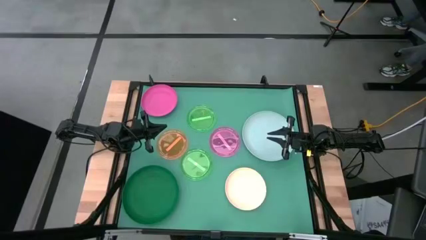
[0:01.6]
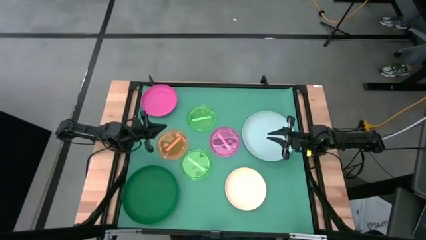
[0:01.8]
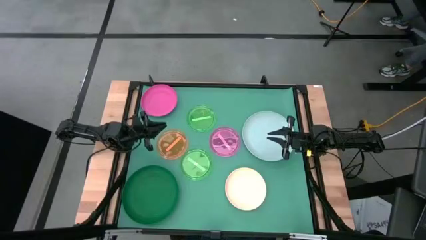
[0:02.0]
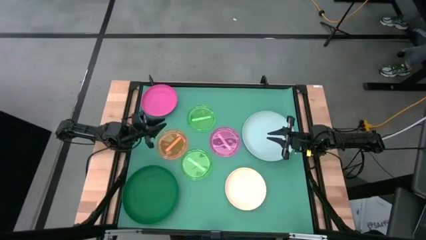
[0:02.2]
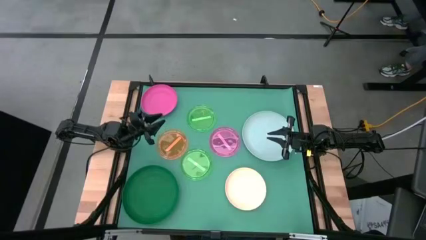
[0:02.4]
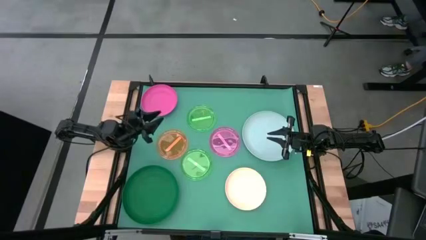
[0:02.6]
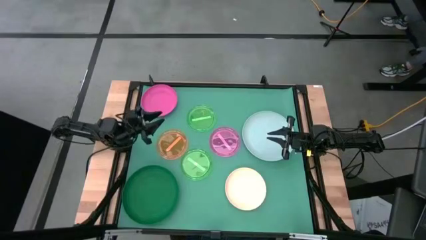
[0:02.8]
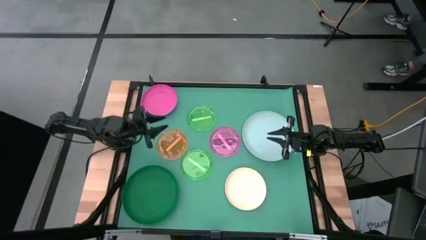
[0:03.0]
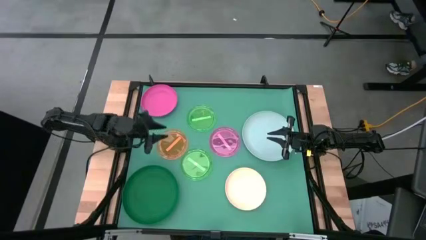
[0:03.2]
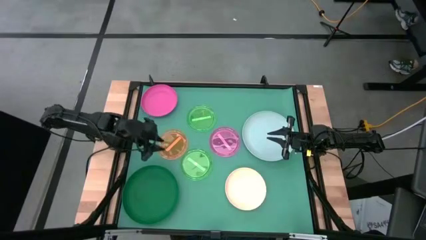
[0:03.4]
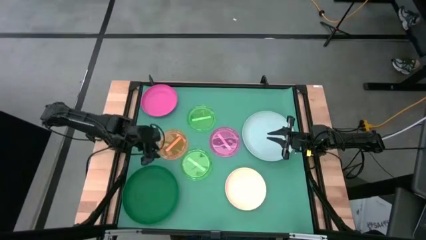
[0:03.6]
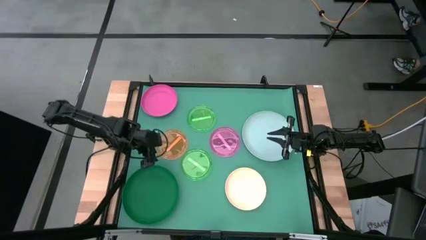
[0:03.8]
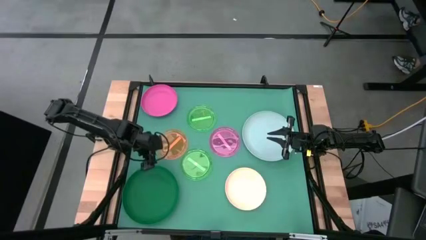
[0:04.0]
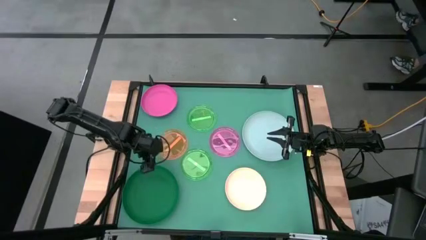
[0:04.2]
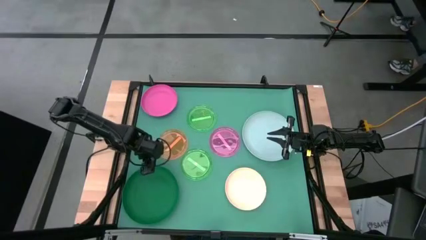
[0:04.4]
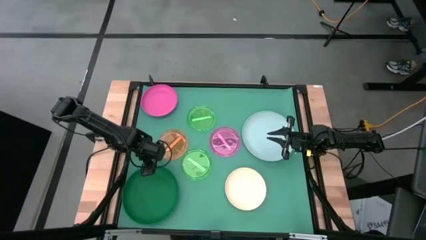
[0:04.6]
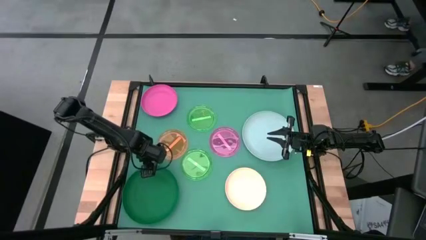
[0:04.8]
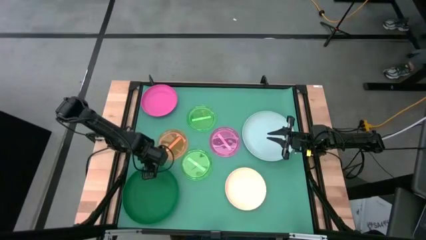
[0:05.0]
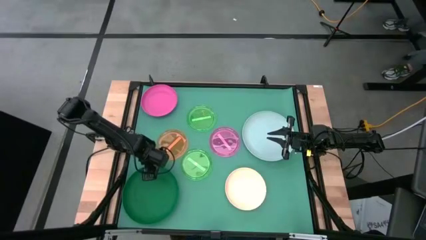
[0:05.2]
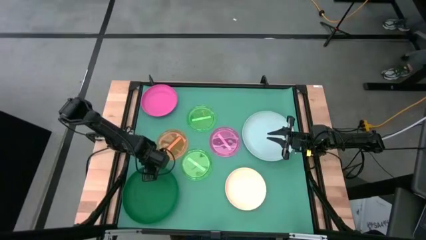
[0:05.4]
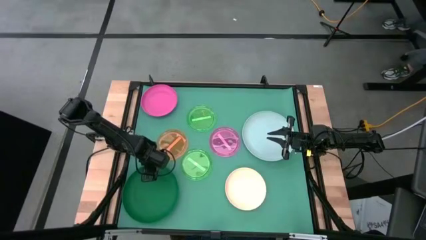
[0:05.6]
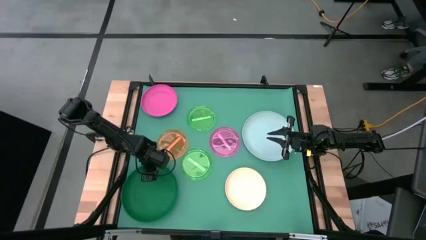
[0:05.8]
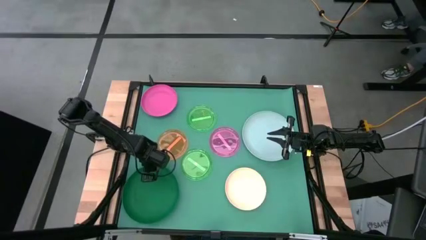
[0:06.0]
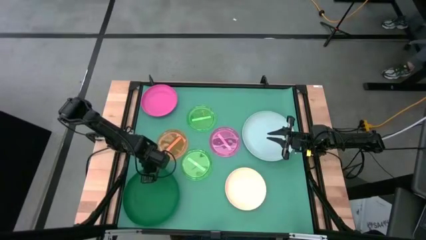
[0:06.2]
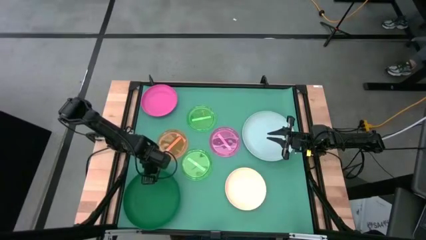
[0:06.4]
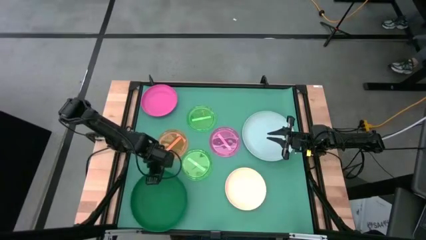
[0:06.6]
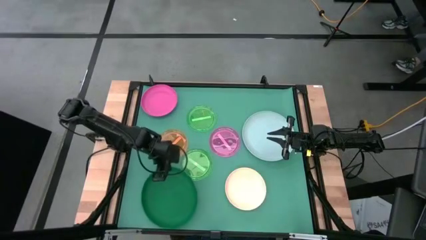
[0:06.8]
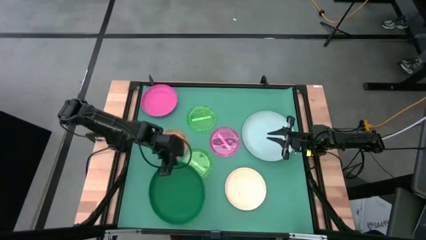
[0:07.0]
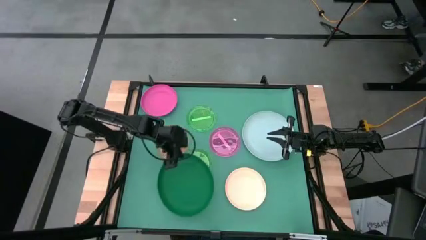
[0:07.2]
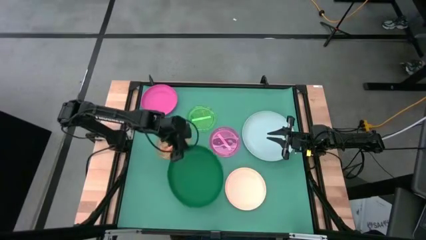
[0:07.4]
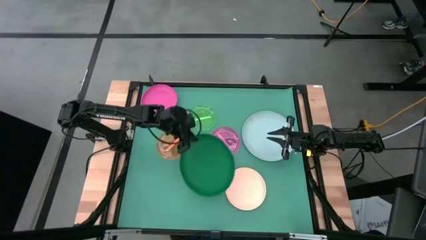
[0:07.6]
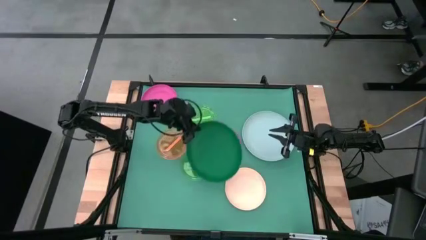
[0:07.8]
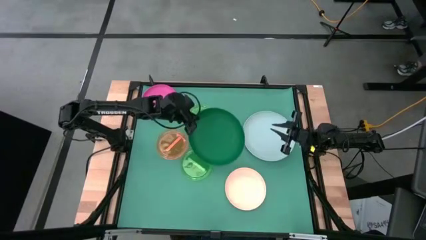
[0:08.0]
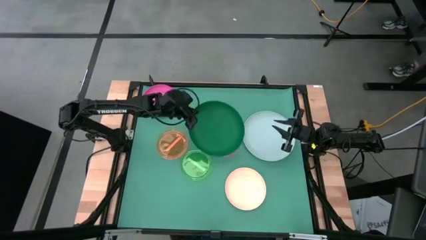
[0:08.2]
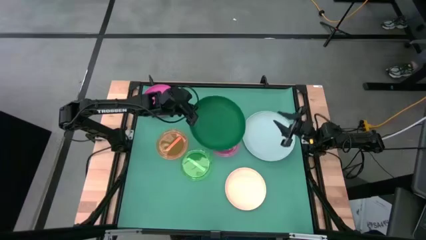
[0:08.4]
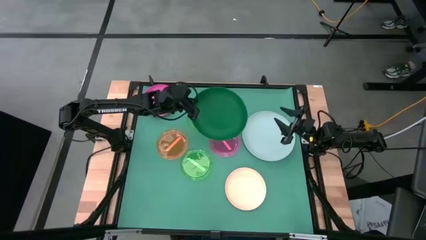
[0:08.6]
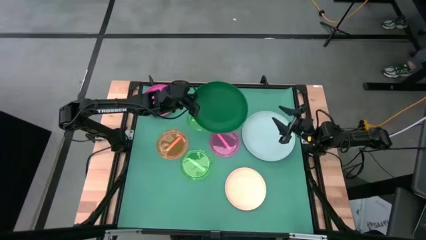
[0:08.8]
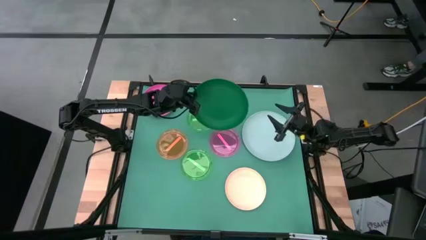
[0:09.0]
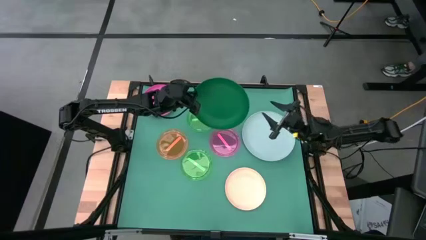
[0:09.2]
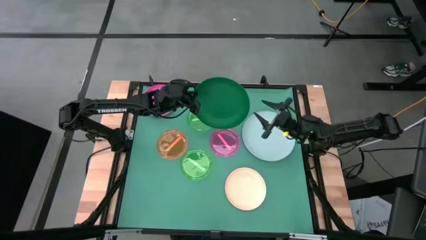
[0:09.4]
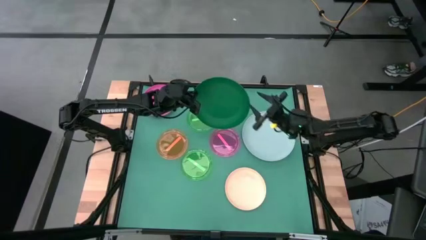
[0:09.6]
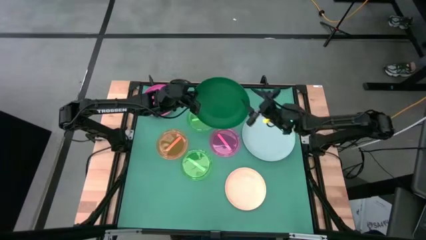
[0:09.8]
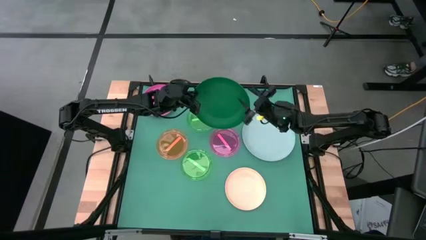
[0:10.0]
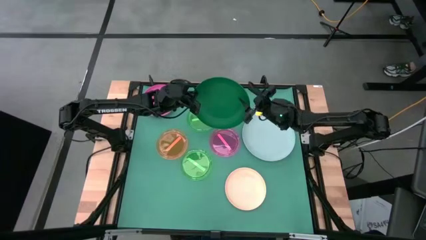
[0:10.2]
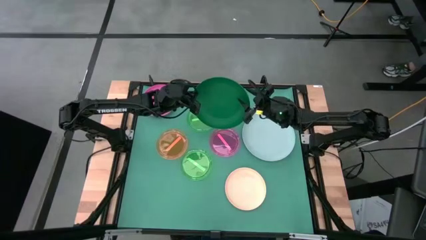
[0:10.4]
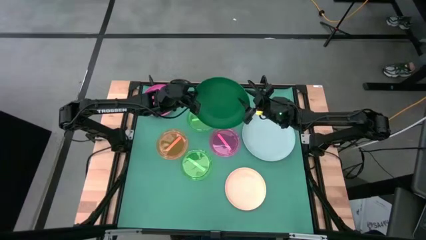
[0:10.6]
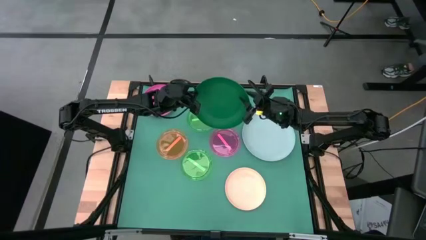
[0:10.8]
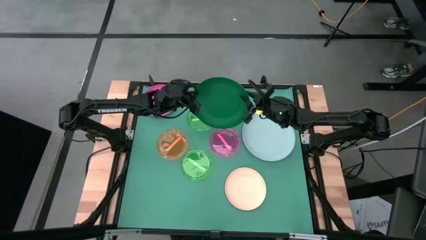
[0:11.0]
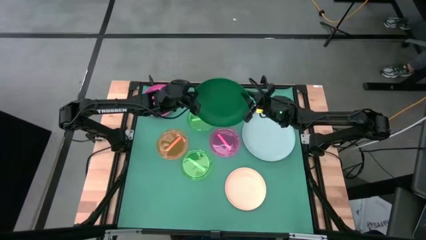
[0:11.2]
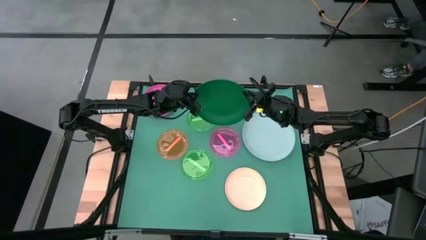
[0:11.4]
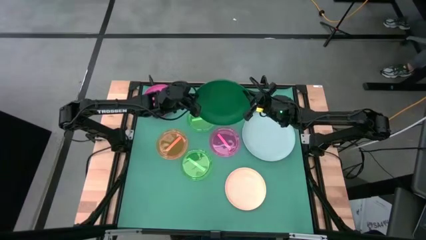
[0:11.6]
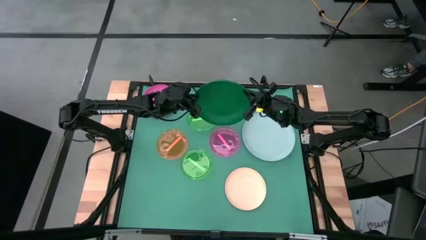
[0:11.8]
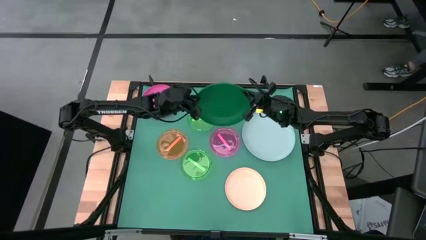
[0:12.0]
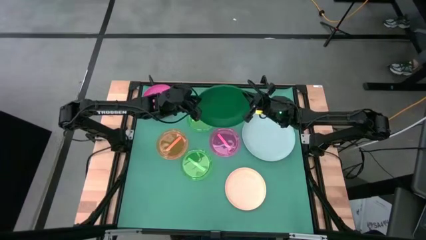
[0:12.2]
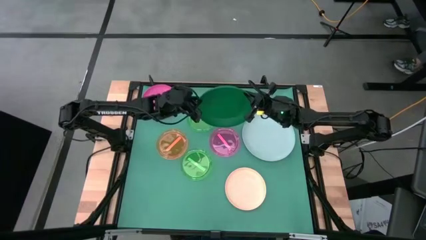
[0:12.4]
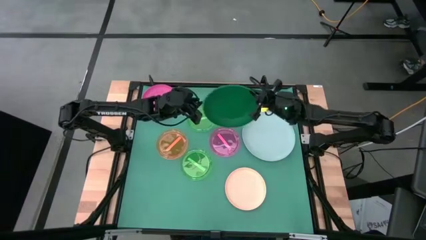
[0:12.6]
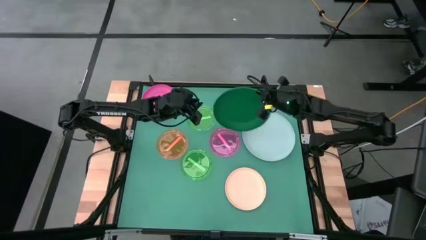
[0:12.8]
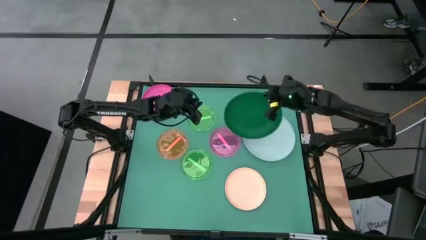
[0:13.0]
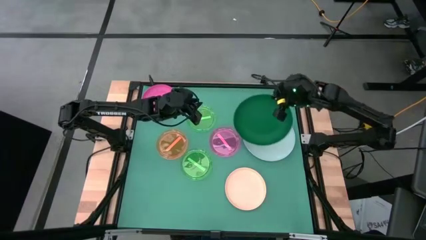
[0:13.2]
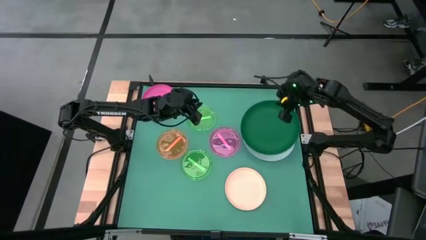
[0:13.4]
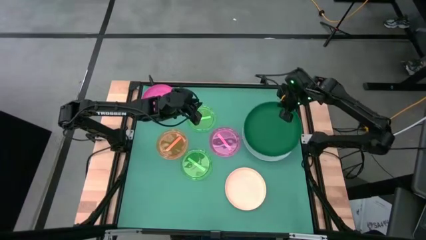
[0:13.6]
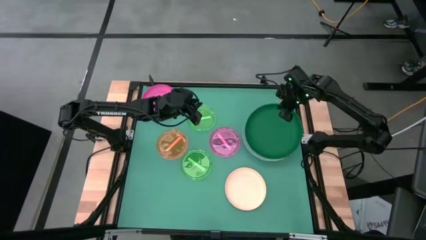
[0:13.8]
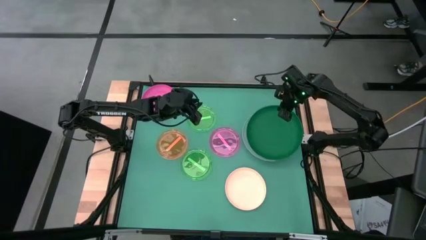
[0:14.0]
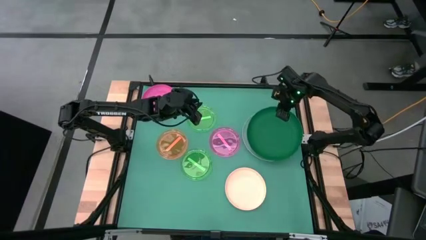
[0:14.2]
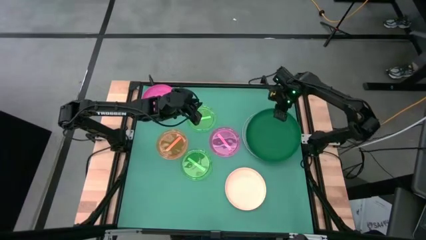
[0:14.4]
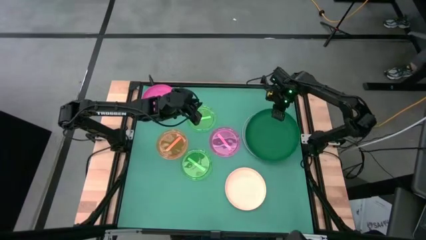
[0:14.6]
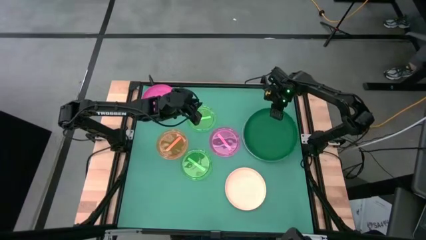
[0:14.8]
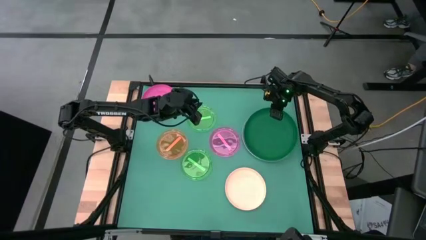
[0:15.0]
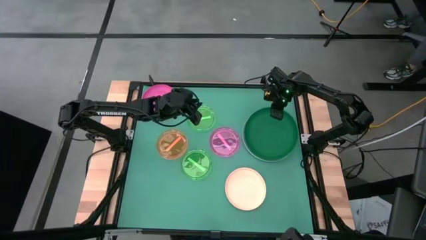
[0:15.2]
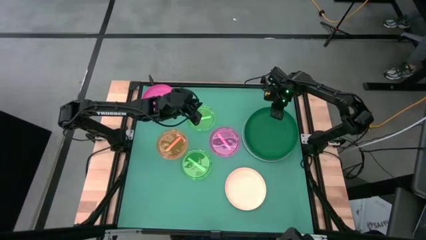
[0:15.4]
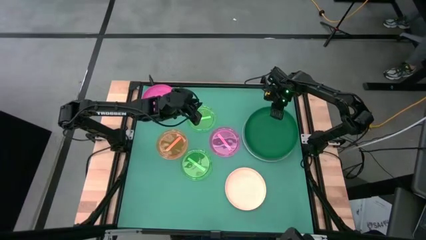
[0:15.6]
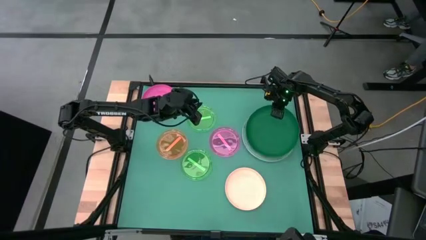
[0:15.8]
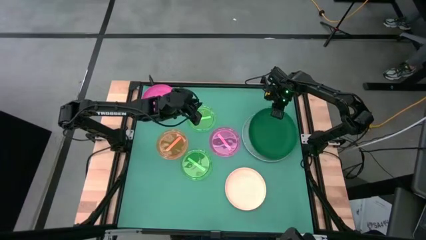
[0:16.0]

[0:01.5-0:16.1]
Task: Stack plastic plates
Stack the green plate on top of the light blue plate
